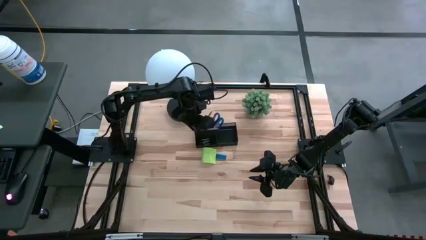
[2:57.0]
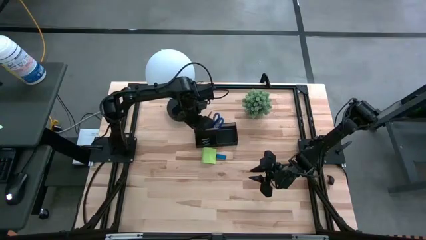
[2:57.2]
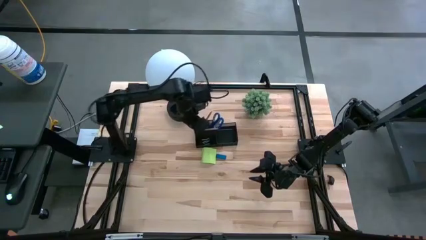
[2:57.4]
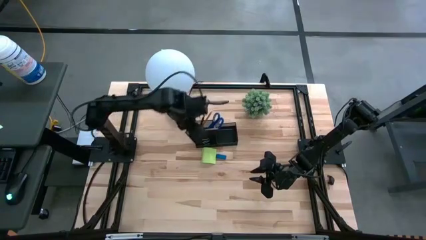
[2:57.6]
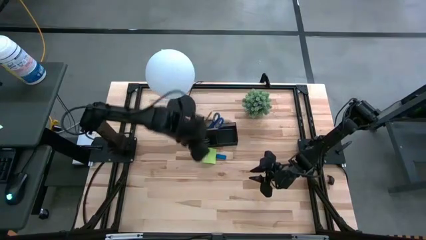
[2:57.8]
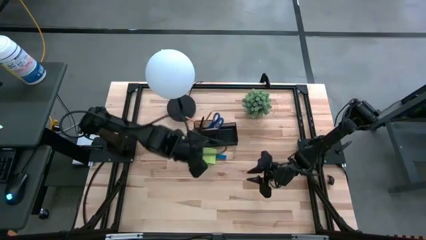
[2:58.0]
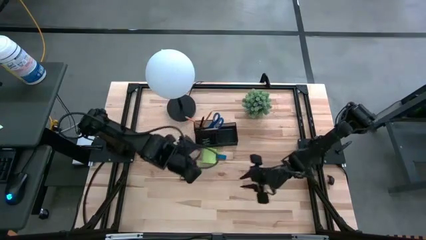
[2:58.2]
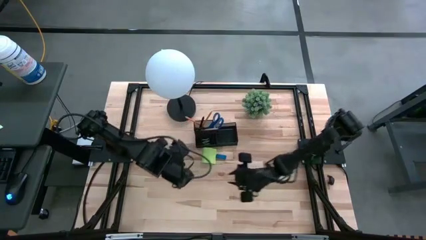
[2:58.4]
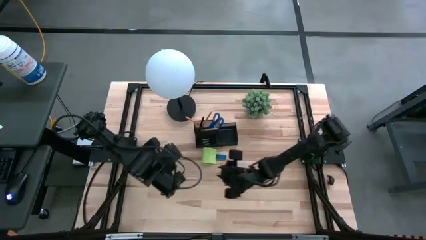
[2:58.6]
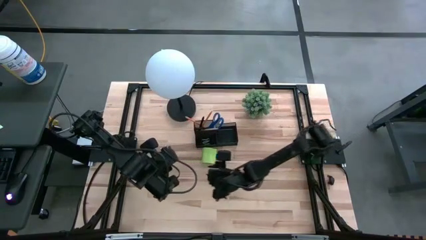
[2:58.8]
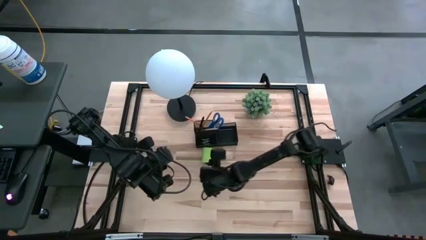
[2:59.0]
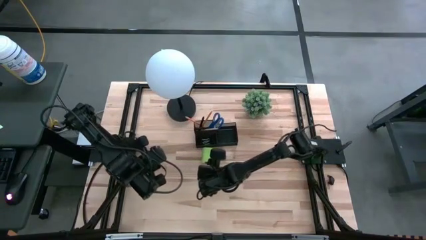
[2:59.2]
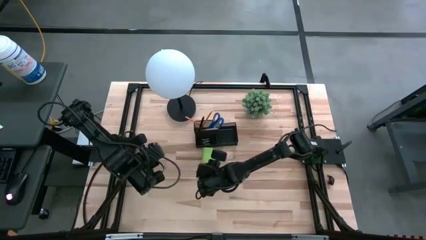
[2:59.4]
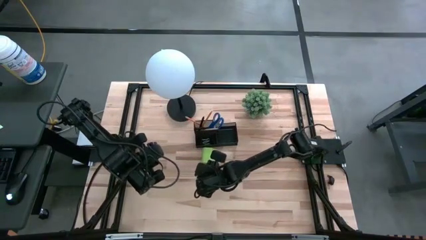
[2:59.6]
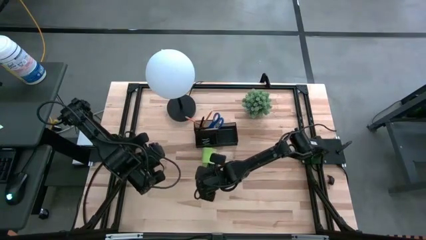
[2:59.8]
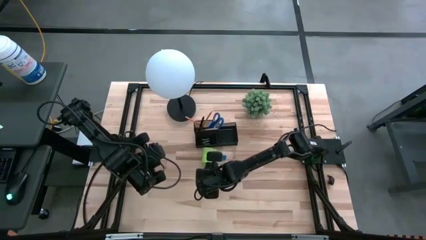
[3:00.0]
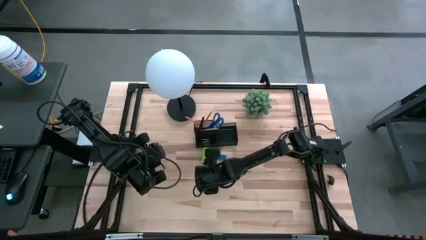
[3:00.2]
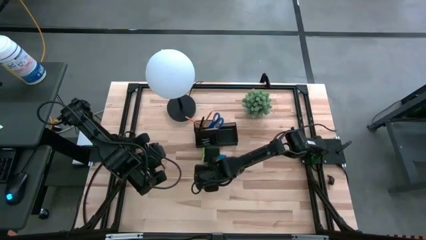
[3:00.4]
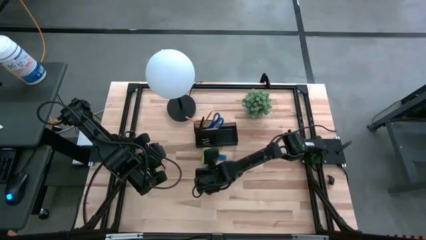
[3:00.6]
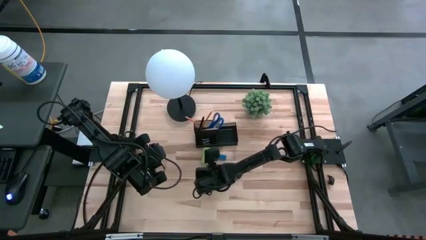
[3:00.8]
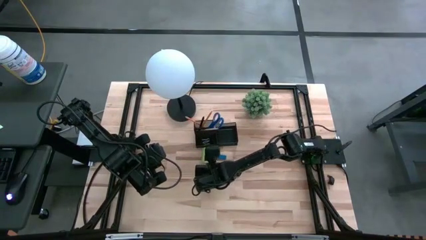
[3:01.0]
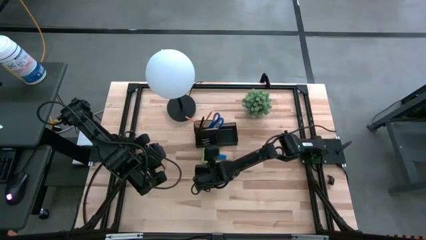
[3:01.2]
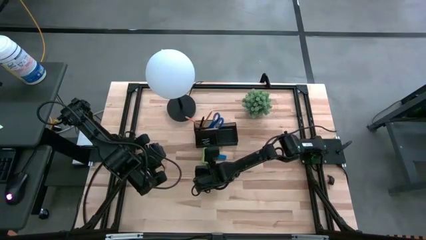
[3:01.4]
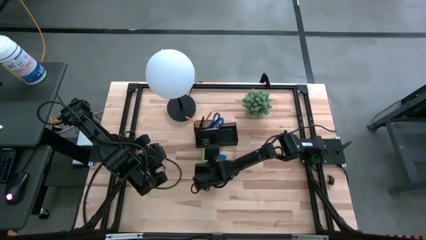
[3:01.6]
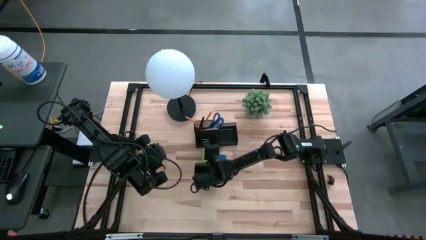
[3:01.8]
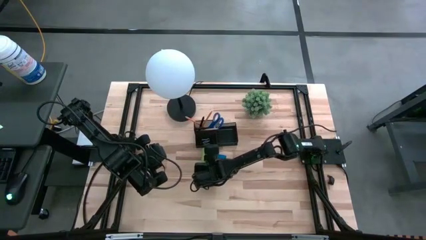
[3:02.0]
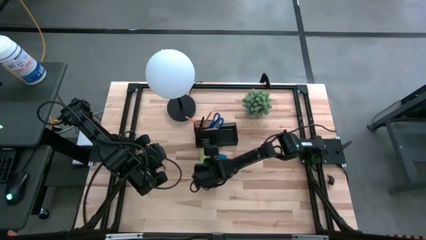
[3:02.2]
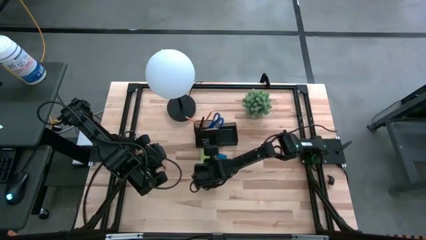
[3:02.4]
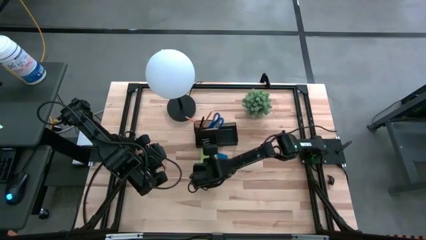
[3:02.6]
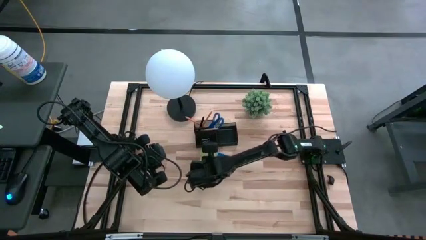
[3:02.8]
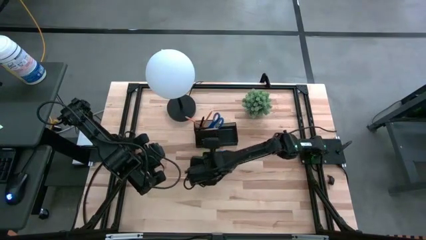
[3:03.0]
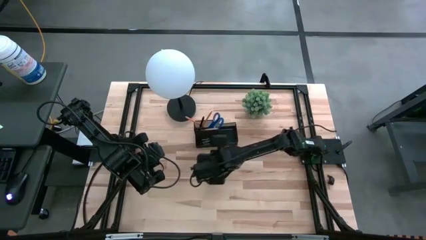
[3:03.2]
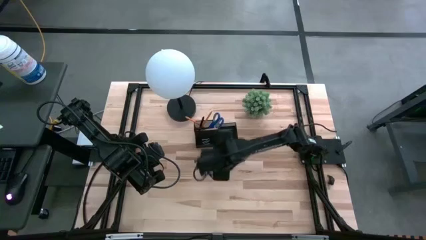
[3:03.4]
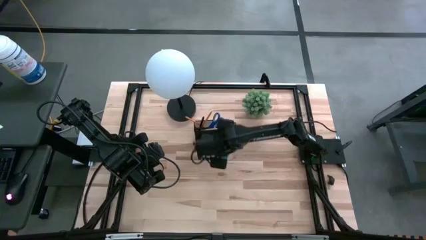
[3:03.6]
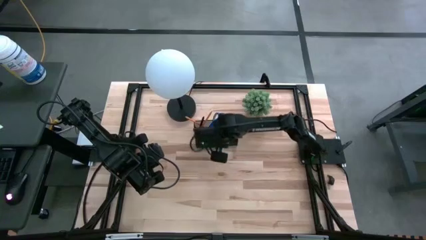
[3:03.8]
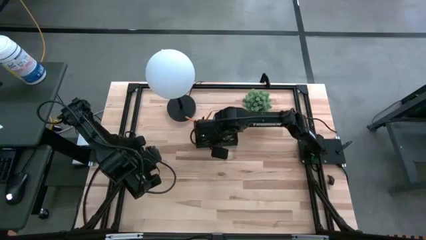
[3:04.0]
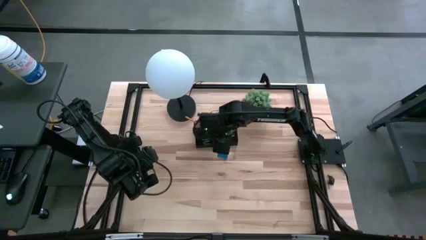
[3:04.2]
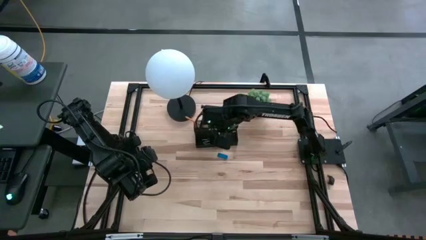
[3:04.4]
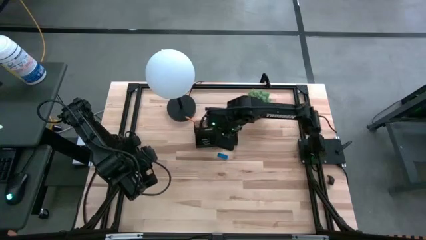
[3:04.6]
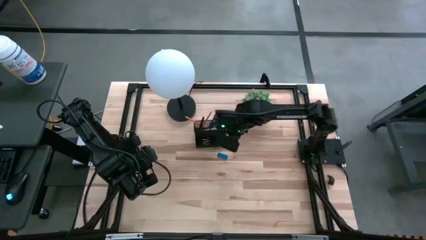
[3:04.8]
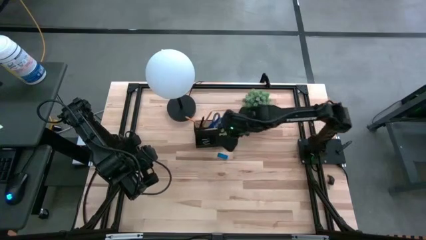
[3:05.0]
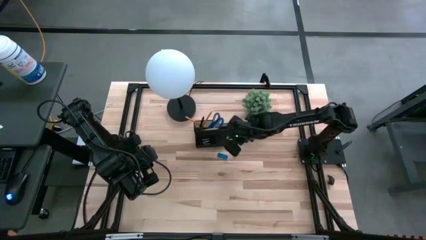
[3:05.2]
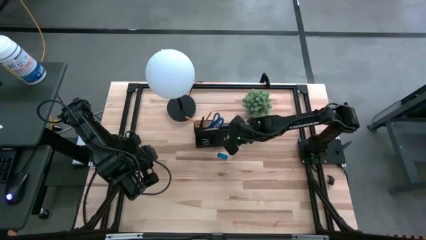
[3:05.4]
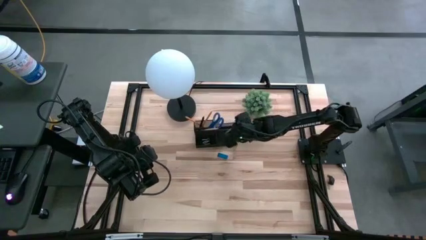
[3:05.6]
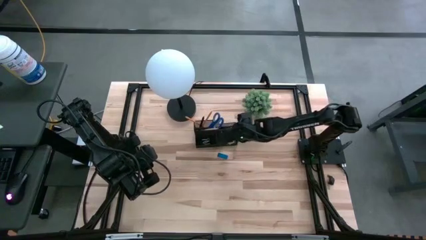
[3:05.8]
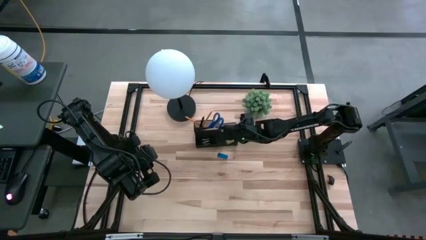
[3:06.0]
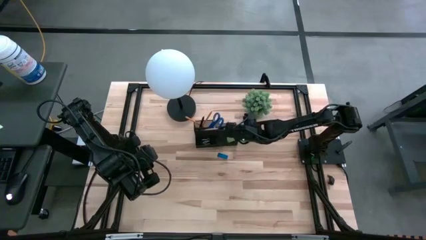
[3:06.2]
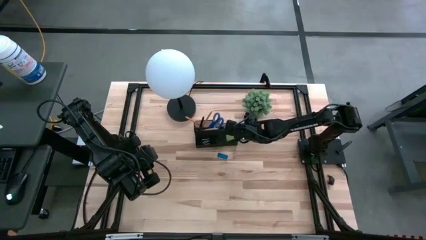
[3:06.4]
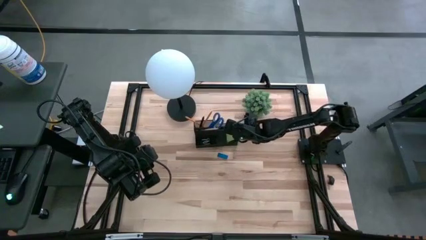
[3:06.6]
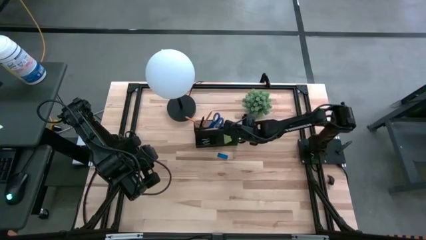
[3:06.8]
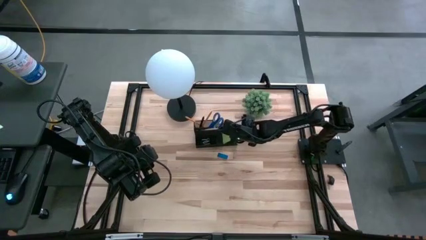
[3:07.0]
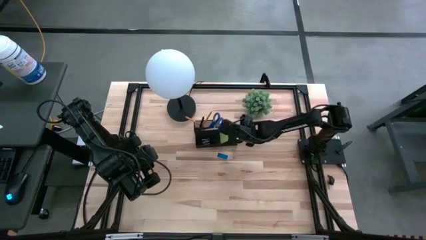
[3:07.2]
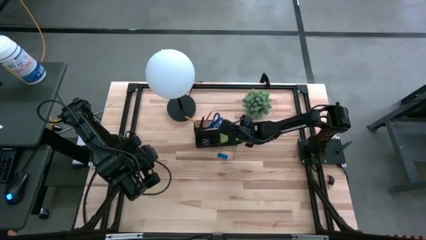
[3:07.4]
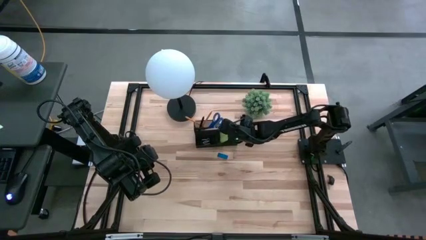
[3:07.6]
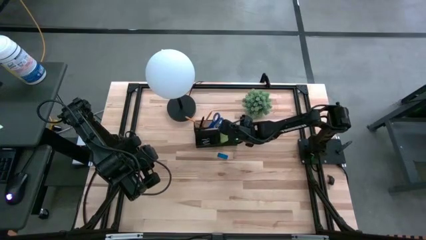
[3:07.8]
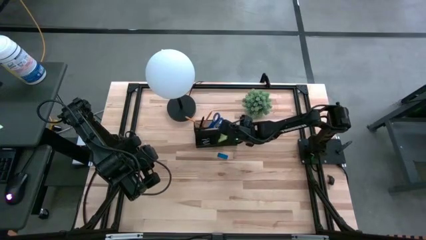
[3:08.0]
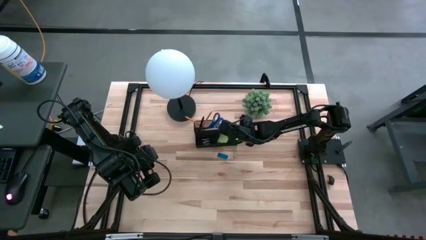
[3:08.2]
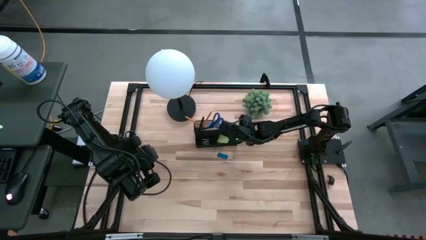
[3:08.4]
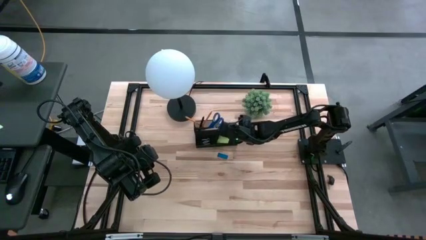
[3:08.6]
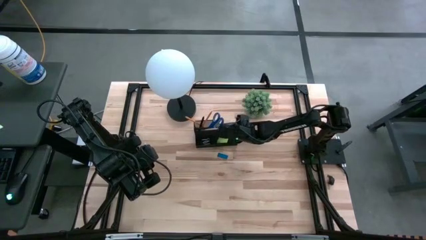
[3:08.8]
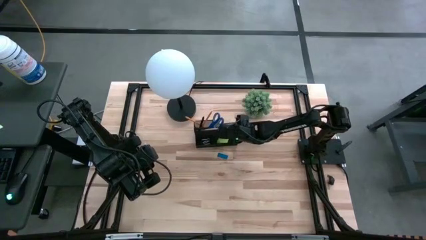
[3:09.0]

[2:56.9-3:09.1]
Task: Pick and place office supplies into organizer
Put the green sticky notes into the right side of the desk organizer

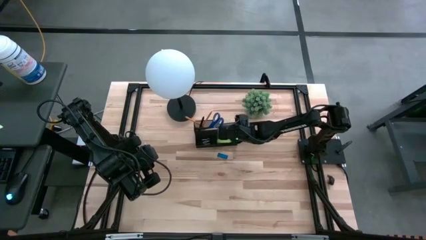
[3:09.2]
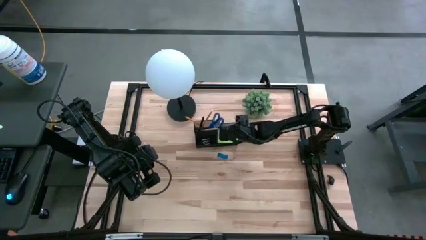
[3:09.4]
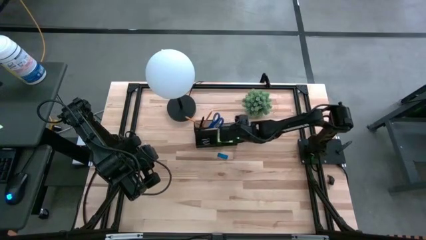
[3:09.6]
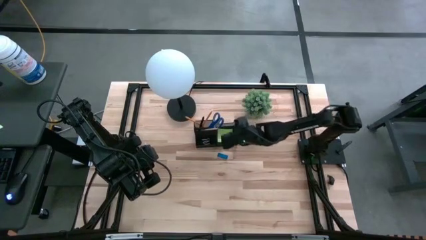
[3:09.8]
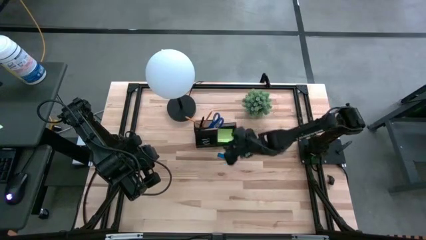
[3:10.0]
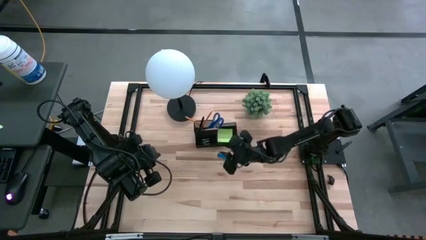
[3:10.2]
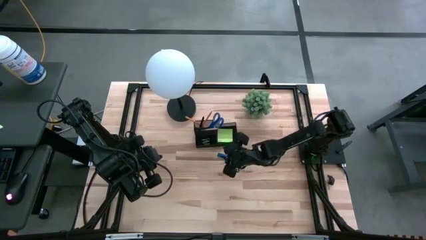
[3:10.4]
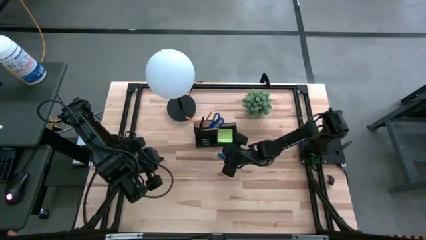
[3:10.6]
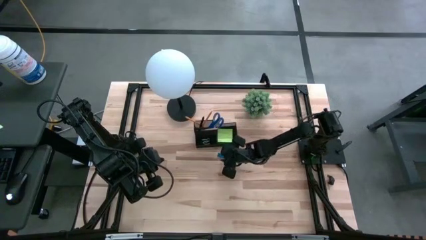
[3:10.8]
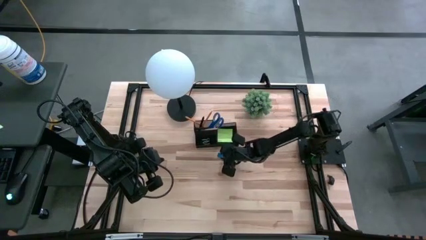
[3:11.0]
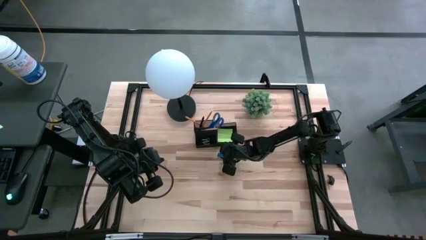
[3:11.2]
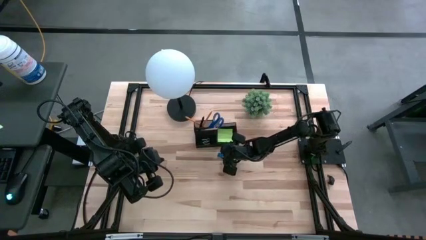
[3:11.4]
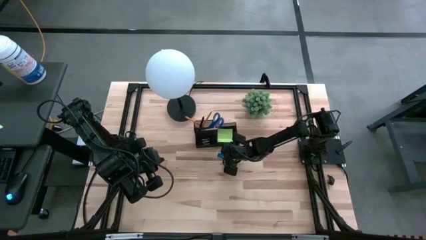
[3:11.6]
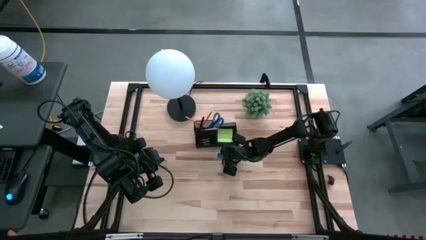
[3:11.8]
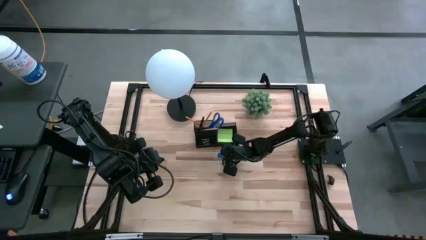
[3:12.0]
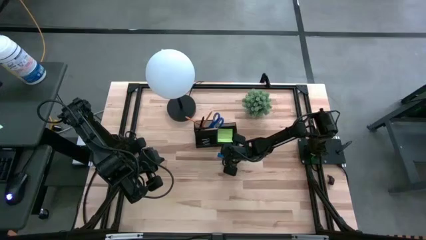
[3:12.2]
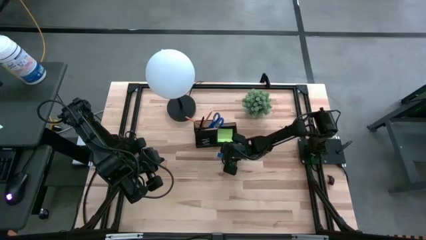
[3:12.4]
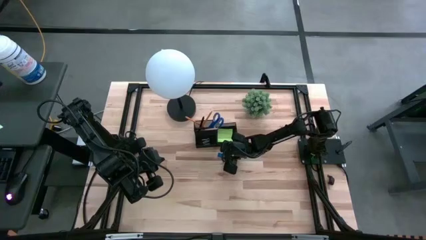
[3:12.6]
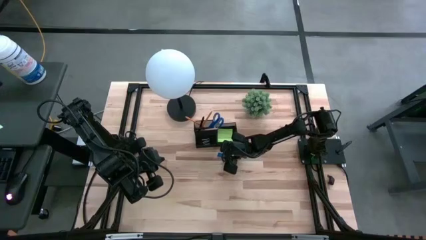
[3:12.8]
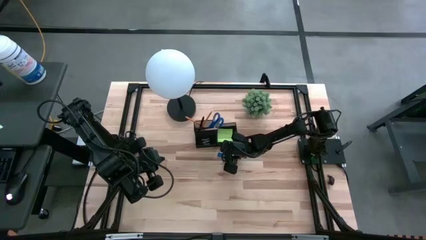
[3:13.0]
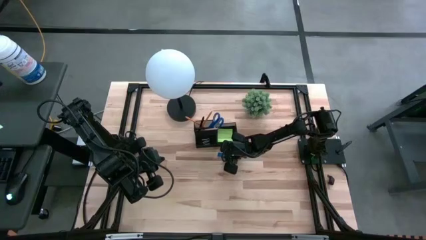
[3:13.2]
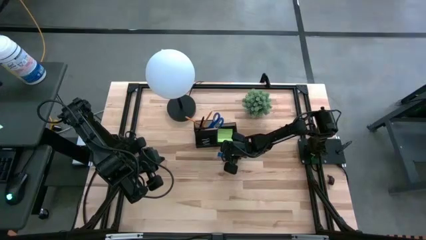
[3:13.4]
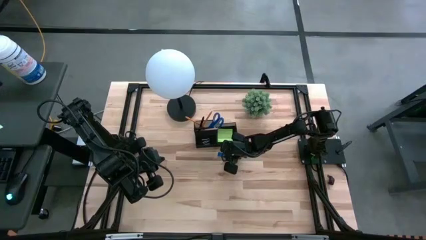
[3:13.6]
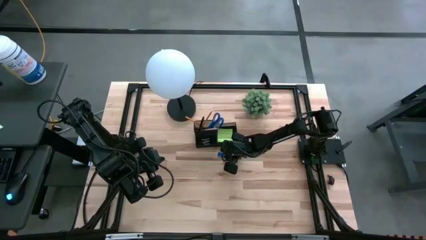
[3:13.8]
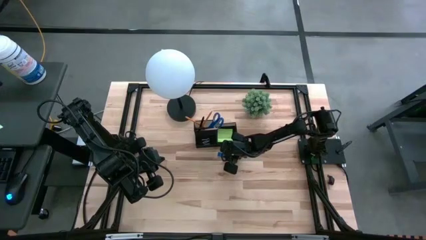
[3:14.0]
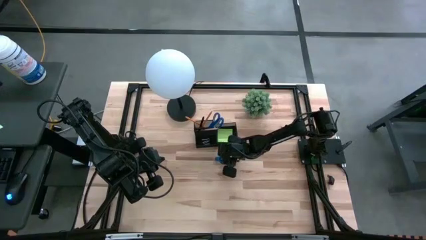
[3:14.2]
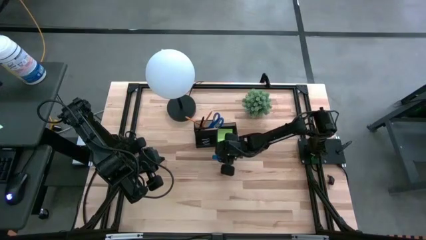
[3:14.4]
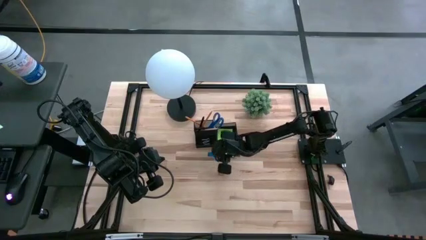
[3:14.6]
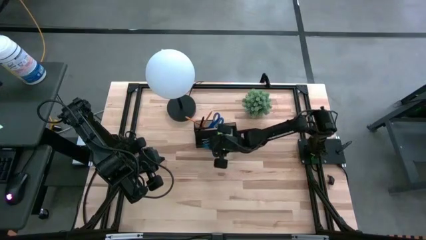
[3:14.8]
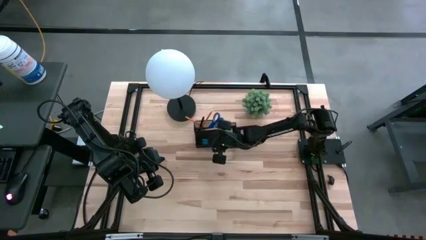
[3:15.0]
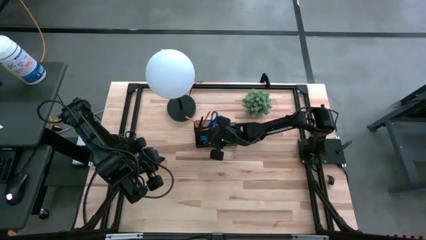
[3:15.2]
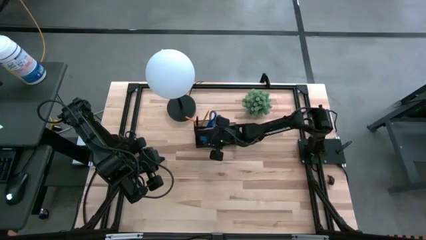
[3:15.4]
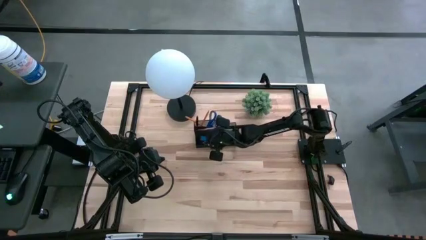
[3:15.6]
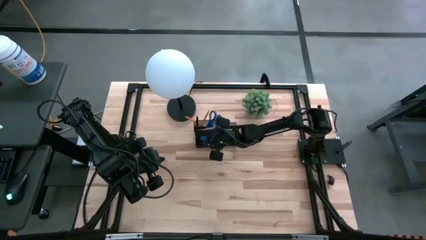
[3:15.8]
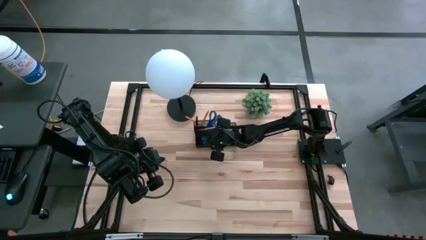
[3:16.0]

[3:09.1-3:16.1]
Put the blue eraser into the bottom left side of the desk organizer
